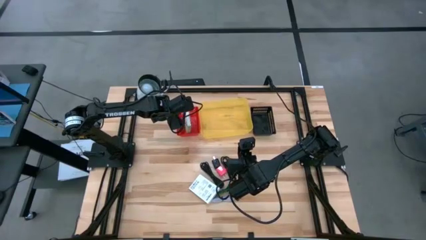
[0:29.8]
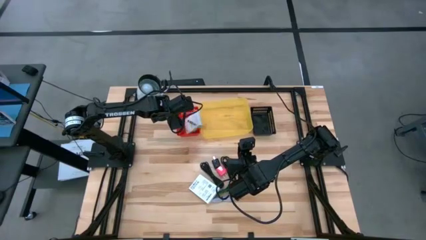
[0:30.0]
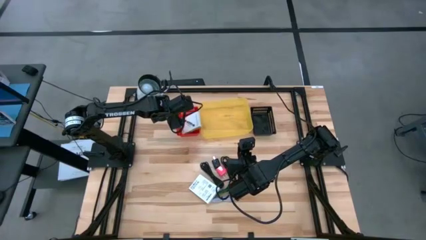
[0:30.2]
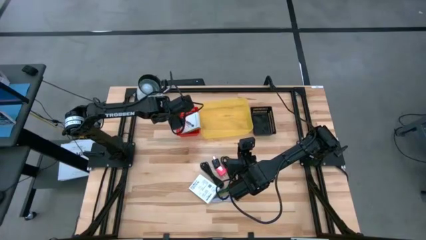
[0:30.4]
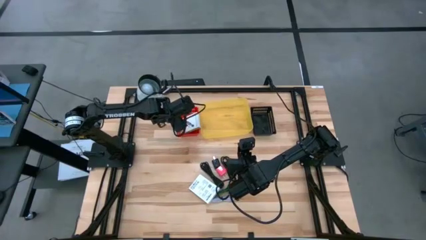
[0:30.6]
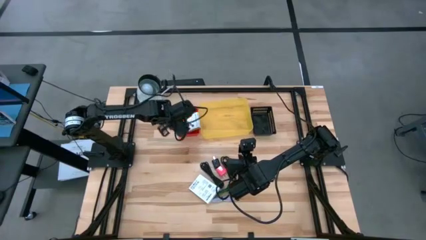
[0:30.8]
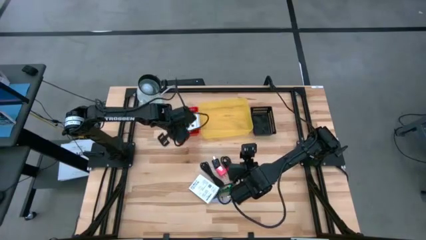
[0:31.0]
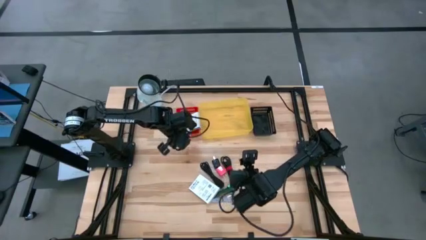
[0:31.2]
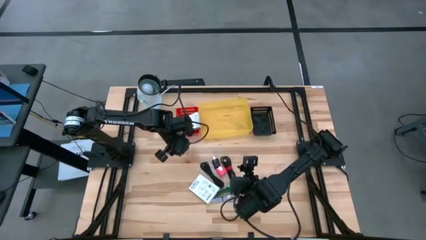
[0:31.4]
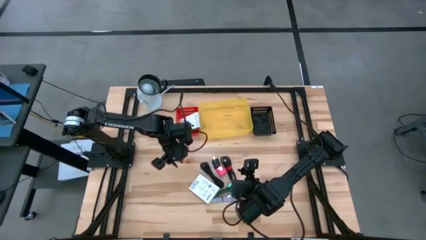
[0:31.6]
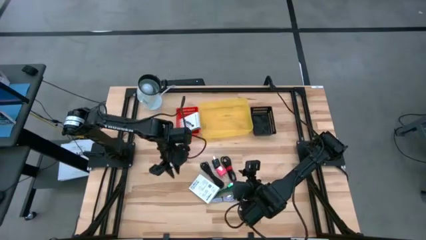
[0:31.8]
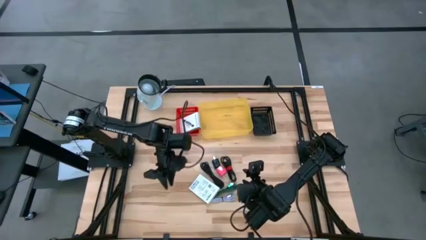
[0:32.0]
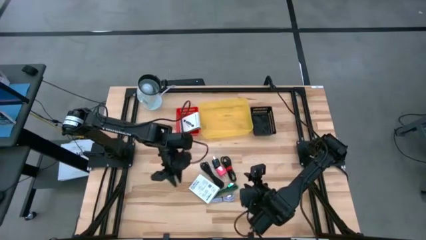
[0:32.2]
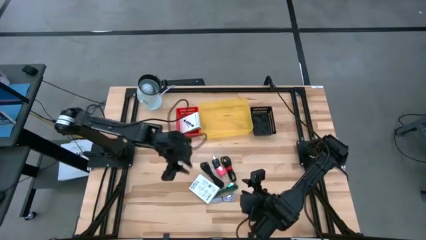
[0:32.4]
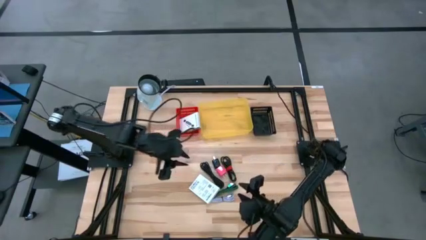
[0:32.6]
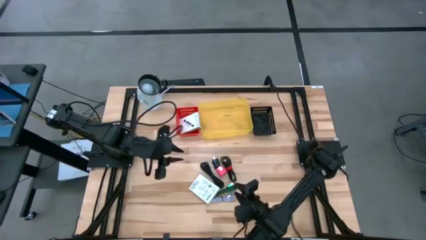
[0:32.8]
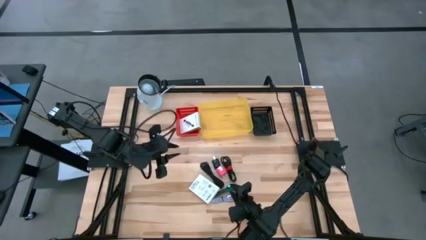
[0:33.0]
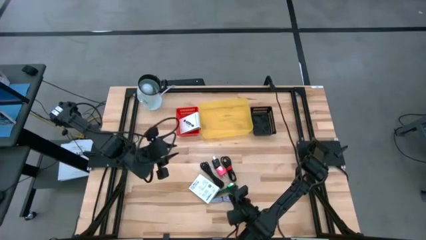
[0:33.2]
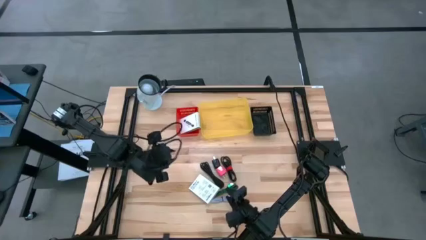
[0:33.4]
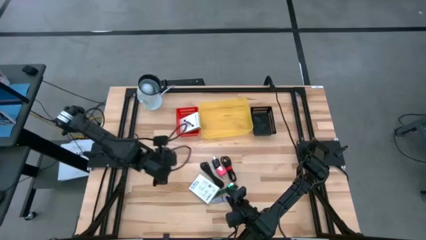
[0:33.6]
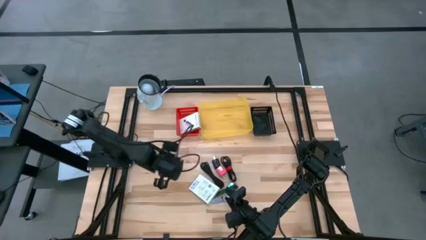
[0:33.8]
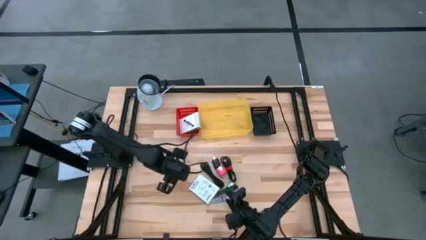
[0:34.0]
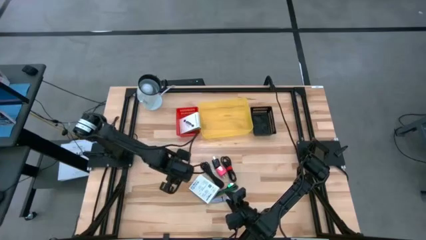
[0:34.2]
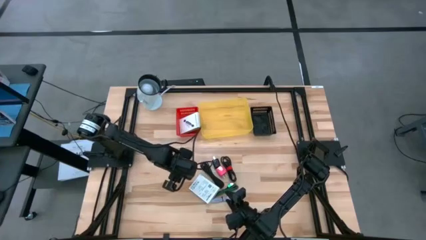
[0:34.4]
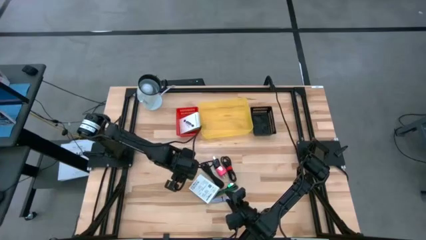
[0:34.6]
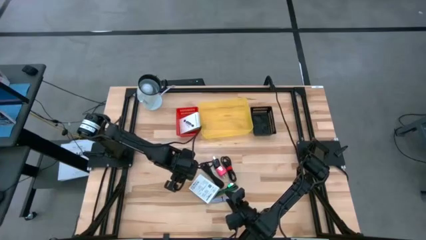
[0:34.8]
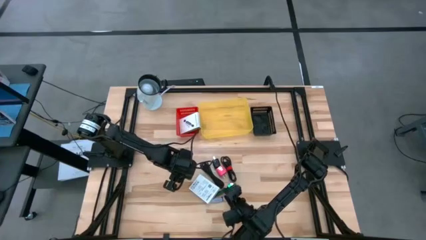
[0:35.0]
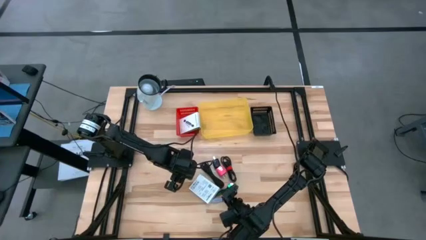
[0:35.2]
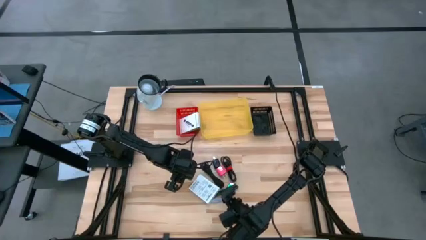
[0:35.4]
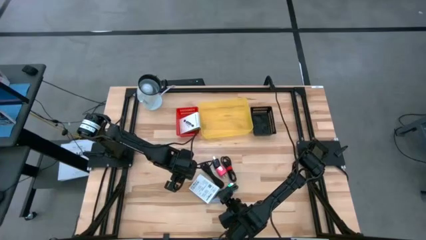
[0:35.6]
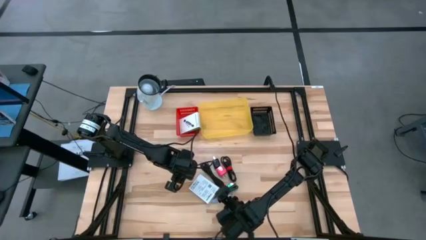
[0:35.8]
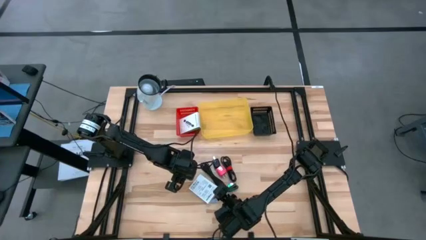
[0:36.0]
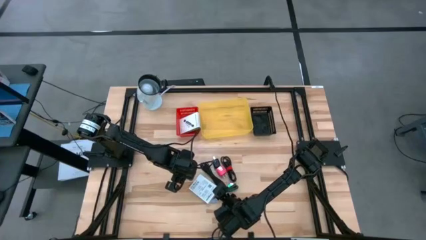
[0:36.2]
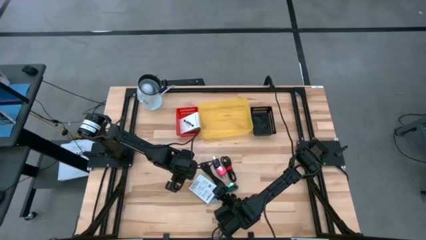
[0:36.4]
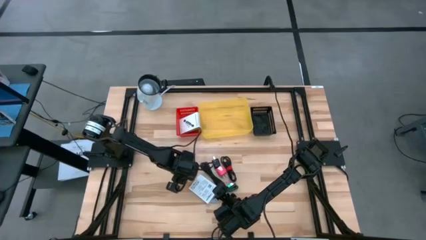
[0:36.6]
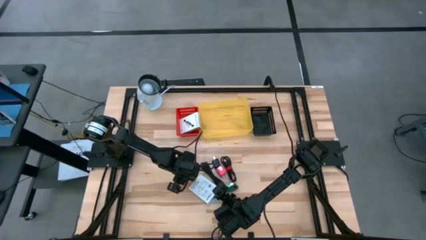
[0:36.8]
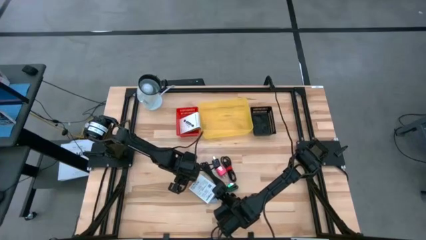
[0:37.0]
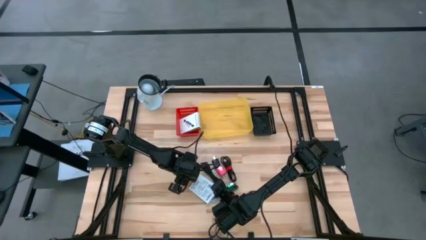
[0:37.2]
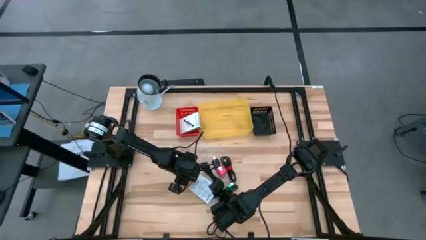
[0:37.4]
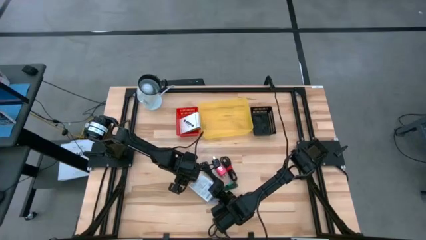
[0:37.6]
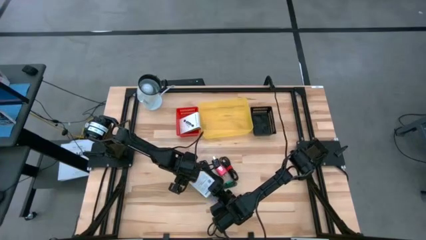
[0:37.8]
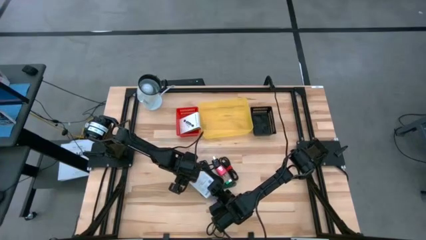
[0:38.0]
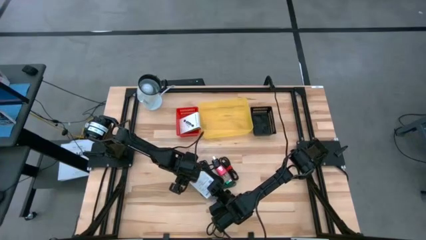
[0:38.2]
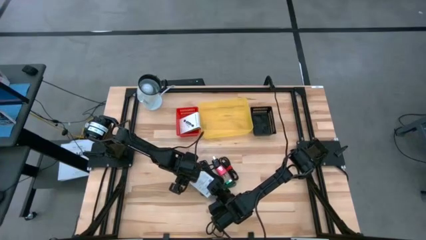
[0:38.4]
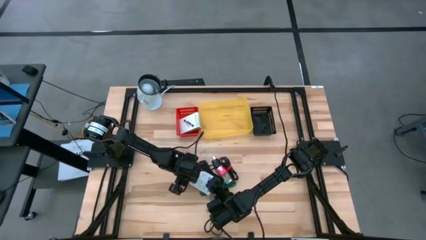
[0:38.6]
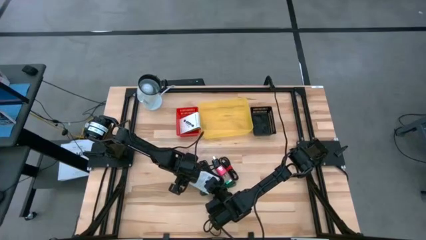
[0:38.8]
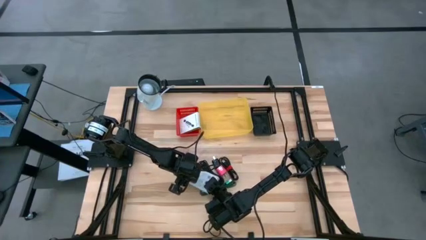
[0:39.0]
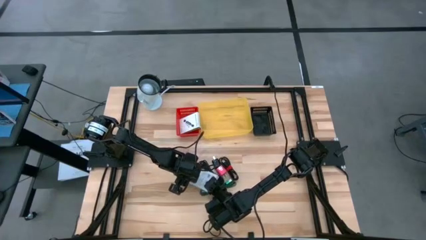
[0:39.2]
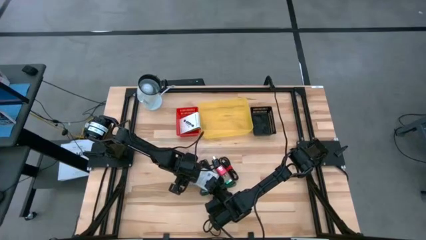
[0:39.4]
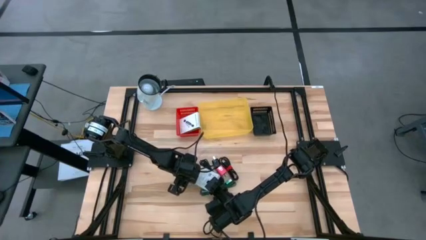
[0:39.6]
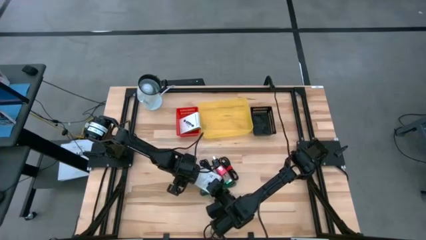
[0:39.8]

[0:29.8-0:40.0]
Task: Pick and place items into bin
Put the white card reader box into the red bin

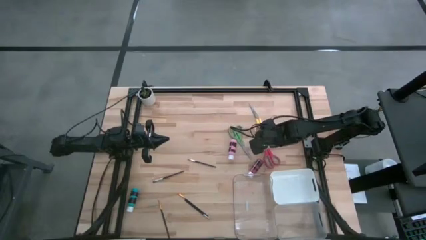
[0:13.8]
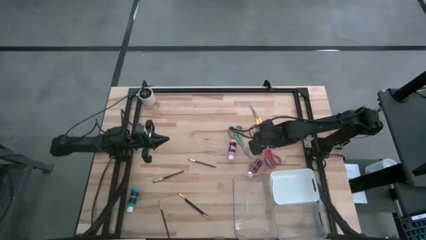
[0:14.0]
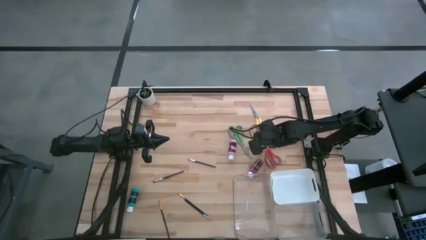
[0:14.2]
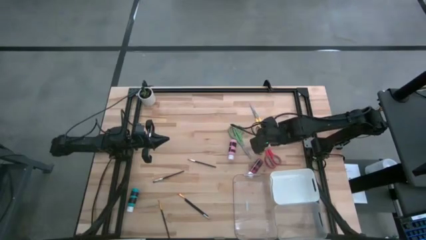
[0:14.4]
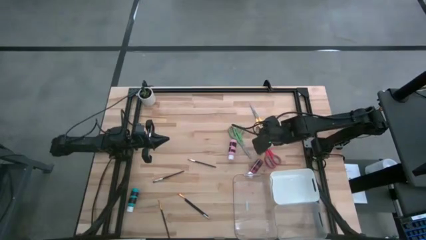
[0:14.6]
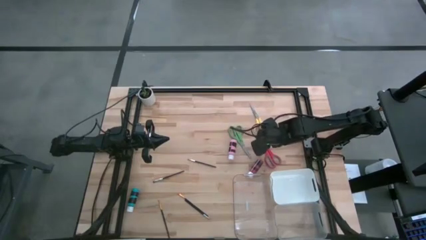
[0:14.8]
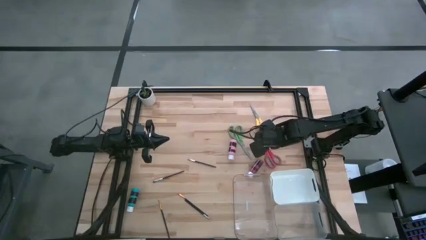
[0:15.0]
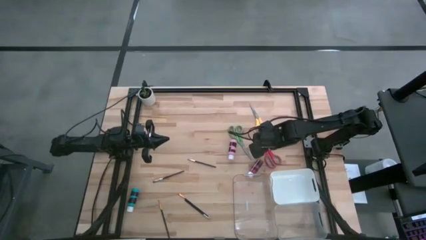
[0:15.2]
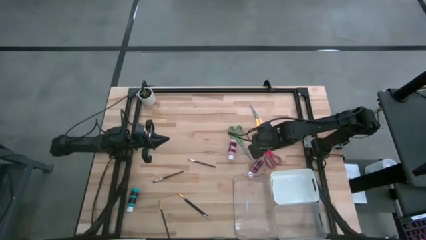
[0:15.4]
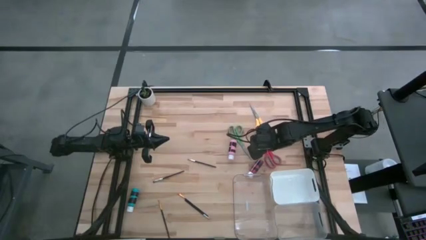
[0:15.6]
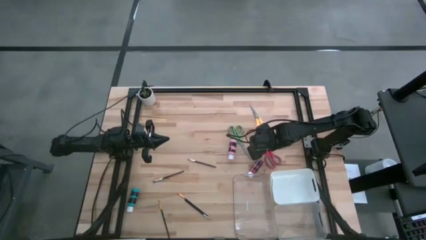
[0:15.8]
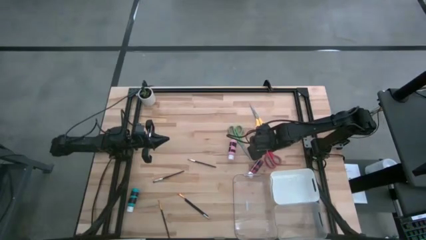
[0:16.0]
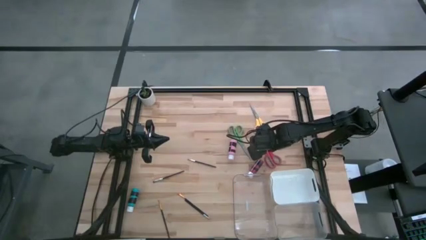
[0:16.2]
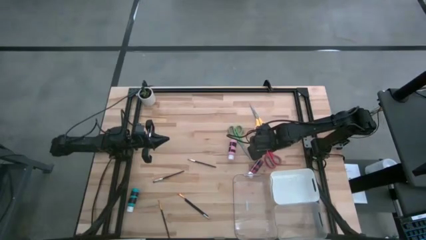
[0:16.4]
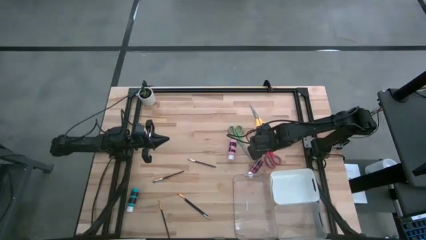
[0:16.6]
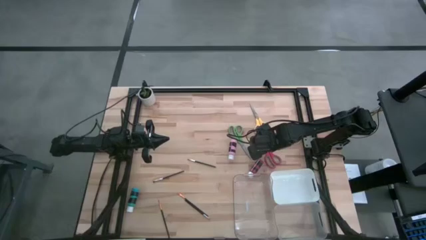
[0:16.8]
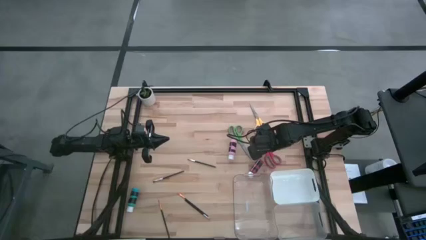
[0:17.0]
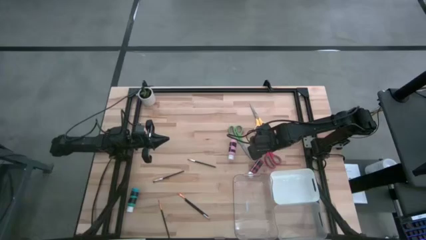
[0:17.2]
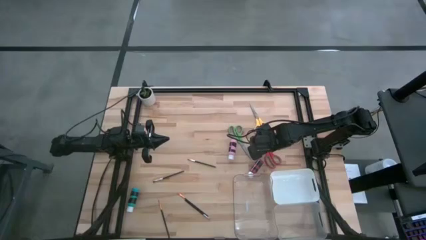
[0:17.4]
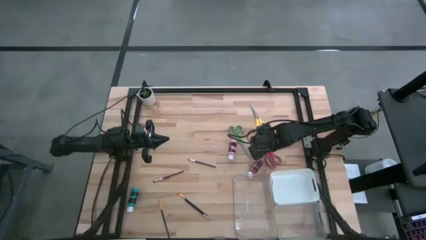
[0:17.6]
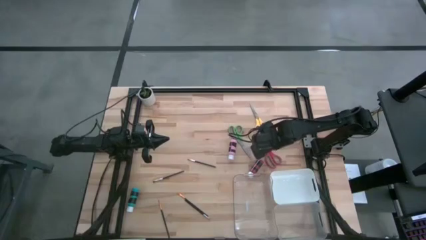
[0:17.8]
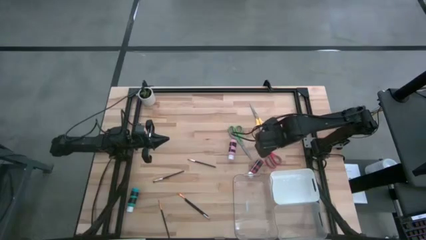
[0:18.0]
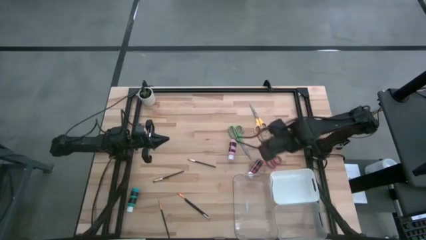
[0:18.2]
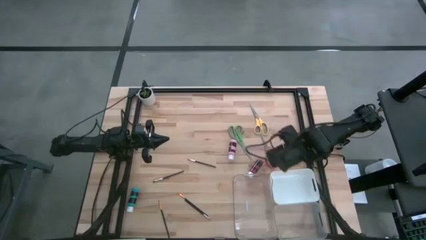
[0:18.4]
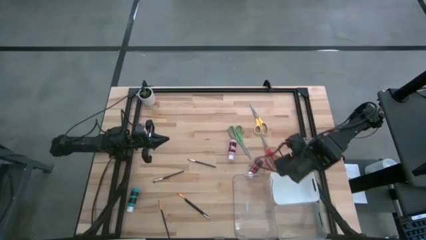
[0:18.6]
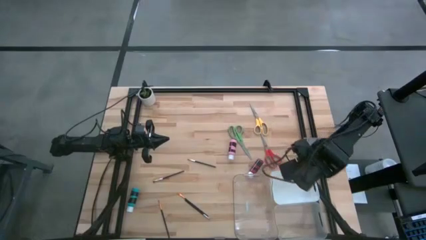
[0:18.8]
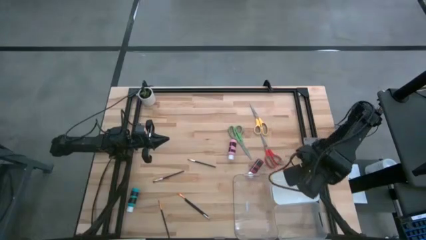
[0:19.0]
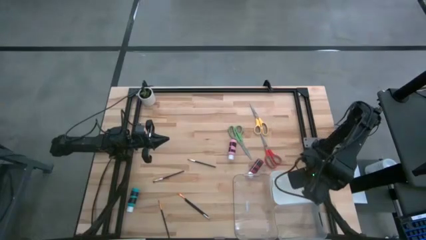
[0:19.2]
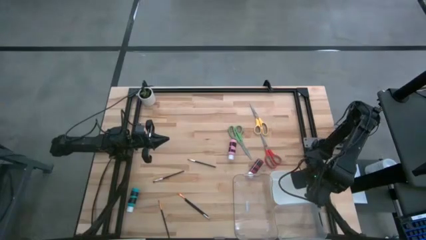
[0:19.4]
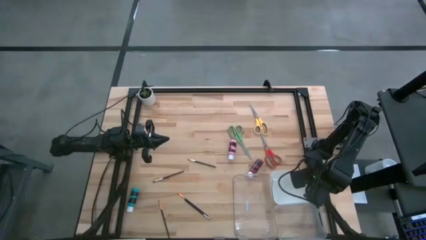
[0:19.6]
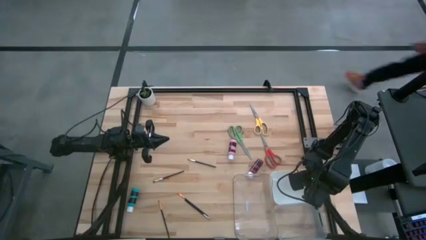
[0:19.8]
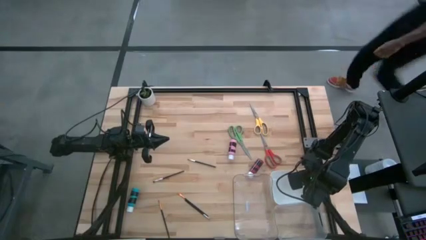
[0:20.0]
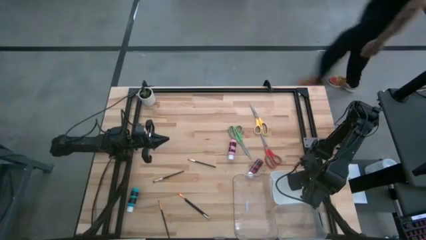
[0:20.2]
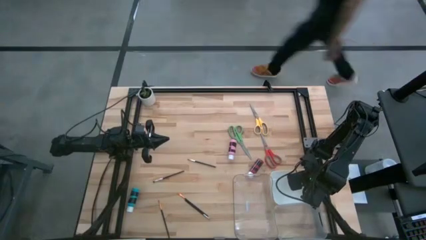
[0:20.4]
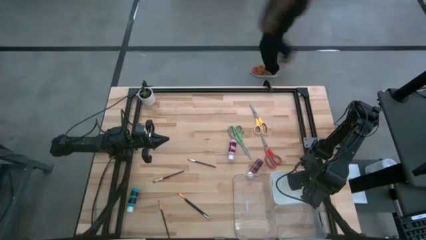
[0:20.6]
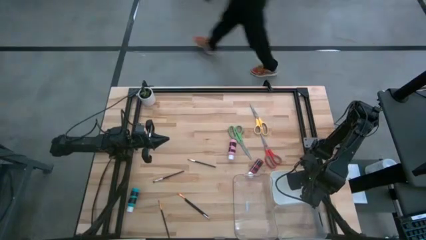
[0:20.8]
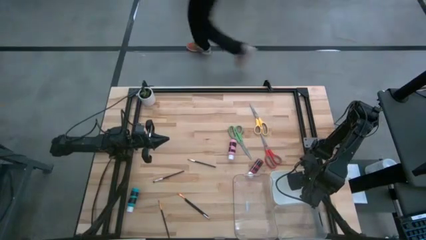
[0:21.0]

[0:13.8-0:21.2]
Task: Pick & Place Paint Supplies
Put the yellow paint bottle into the white bin
